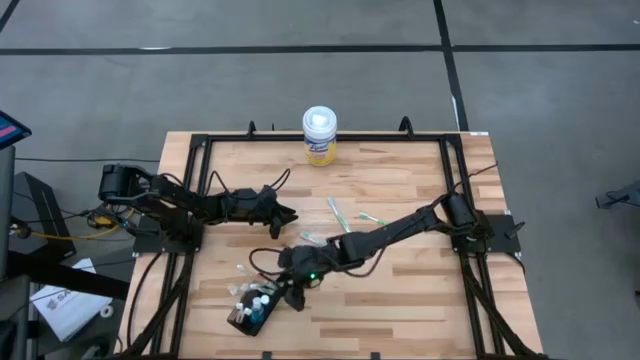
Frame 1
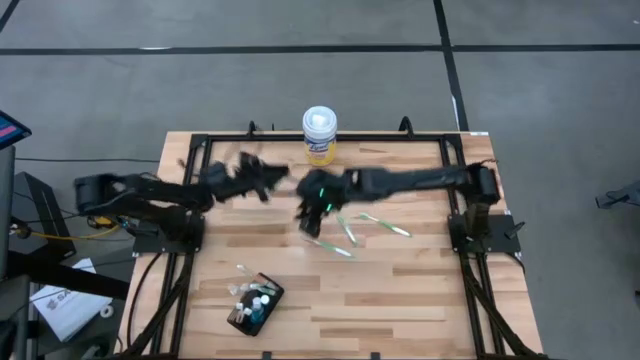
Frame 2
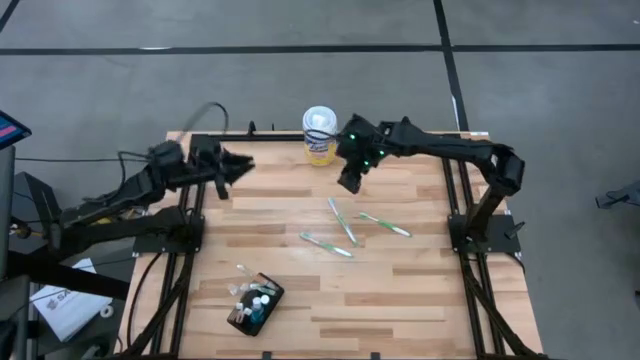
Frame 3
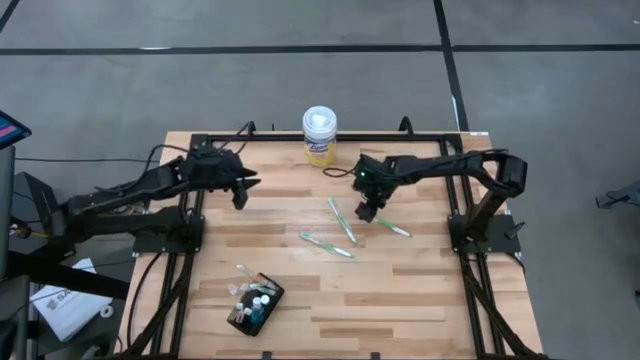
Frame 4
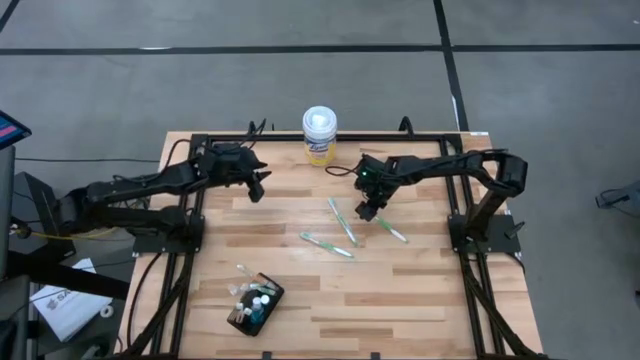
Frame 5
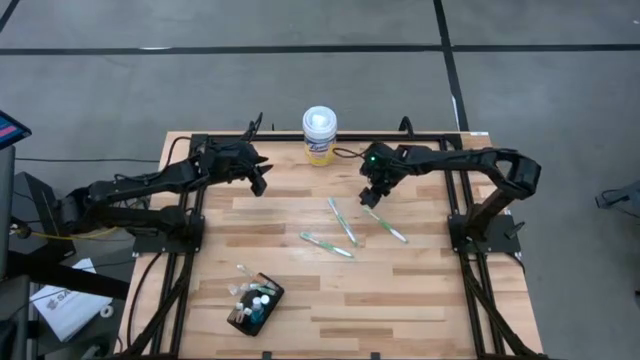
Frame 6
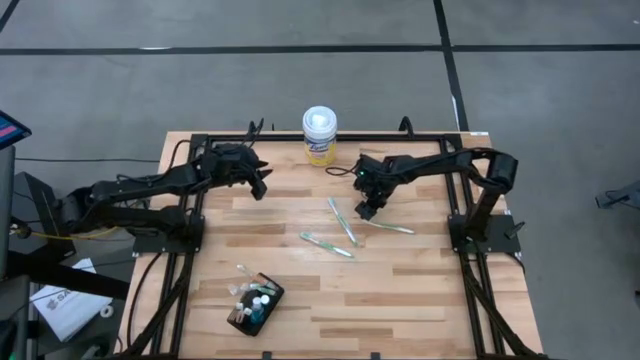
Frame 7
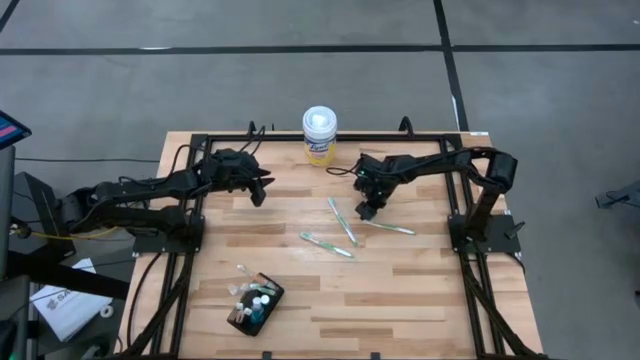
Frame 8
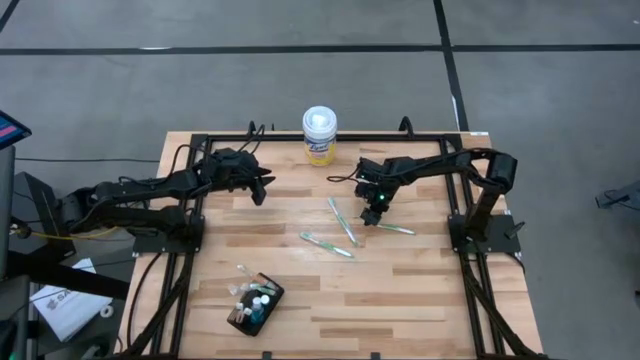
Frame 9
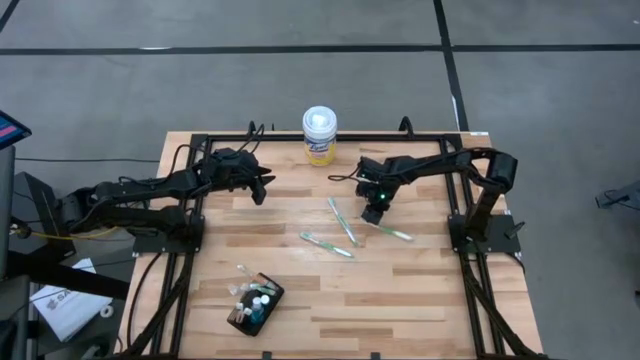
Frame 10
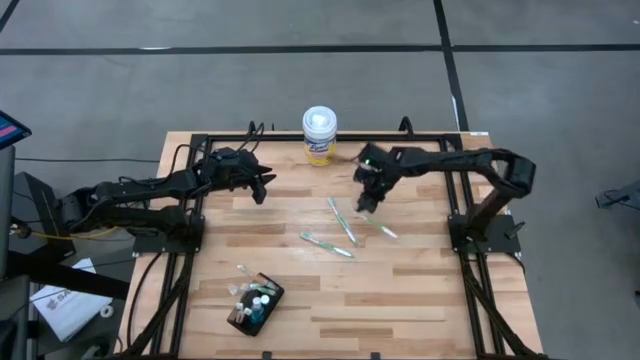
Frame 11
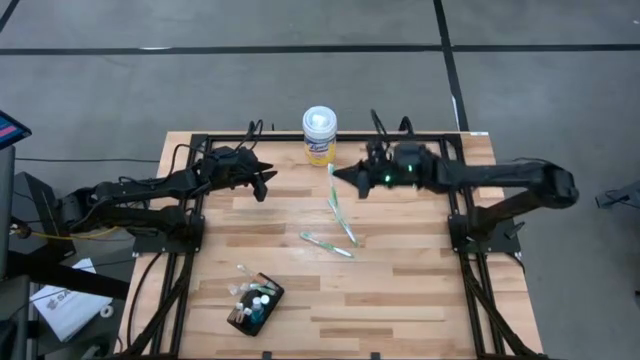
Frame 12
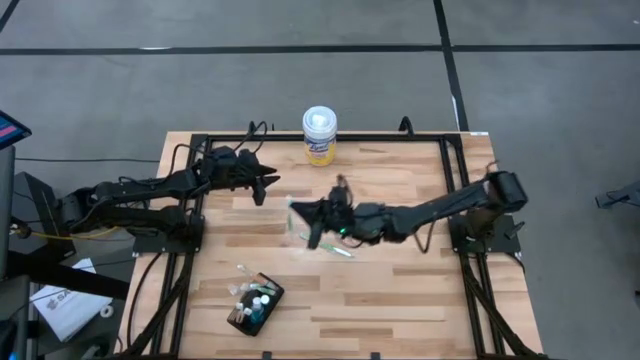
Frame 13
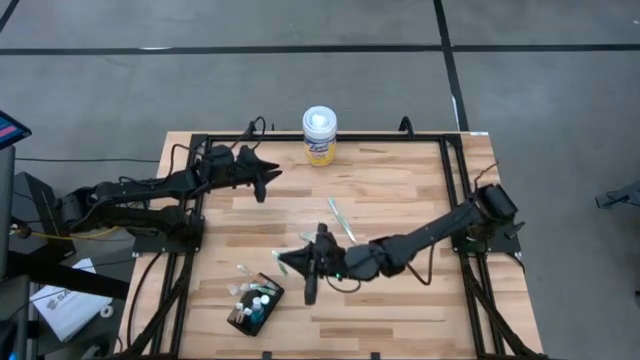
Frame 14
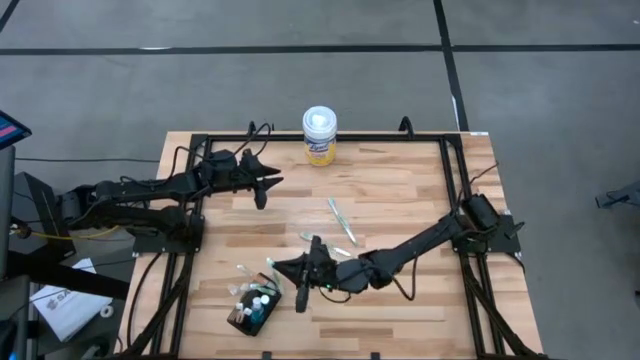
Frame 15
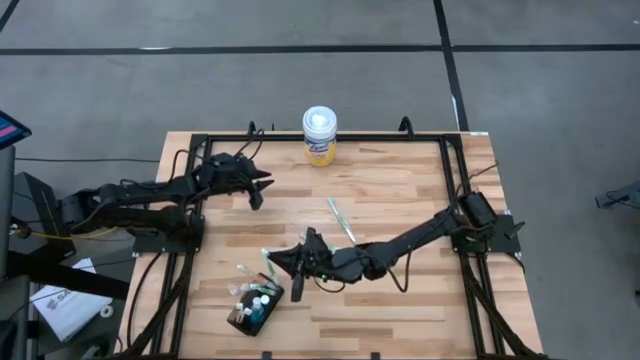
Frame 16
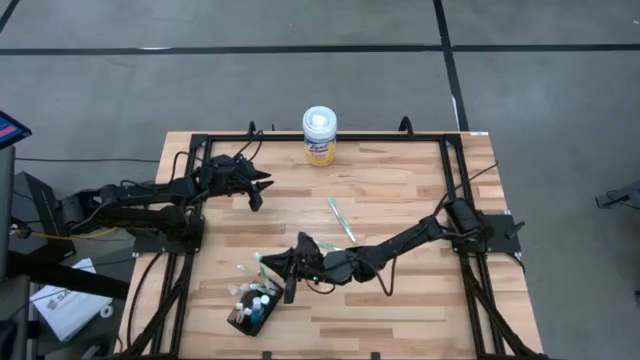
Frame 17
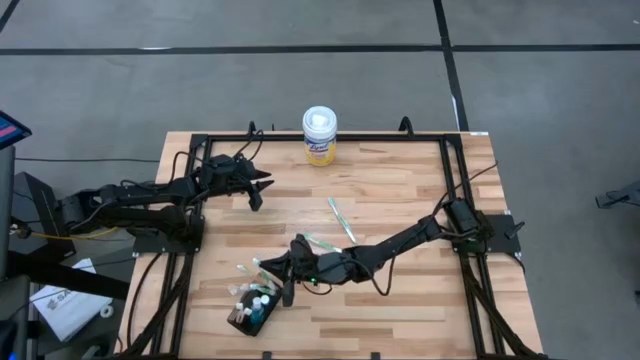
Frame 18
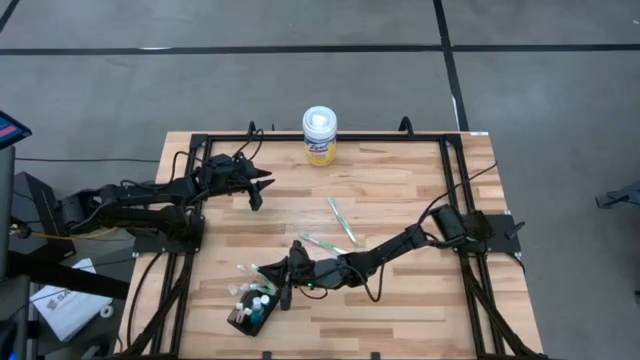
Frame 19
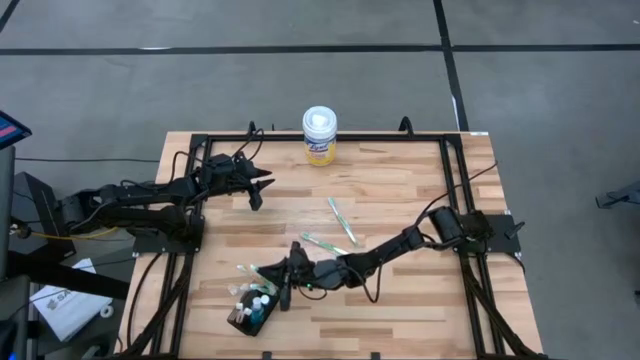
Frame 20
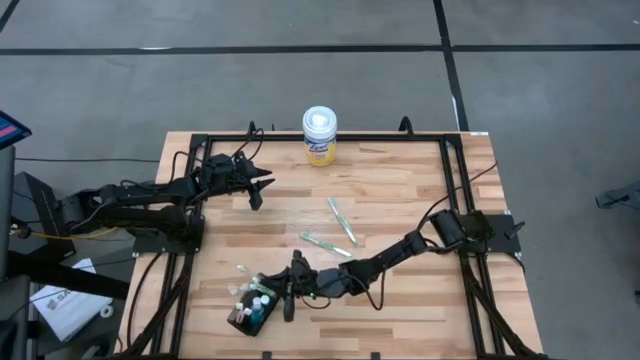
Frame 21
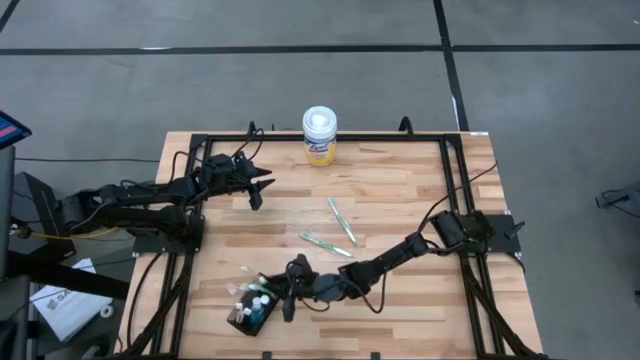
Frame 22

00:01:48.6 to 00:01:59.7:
Task: Pick & Place toothbrushing station
Put the green toothbrush into the black wire organizer bin

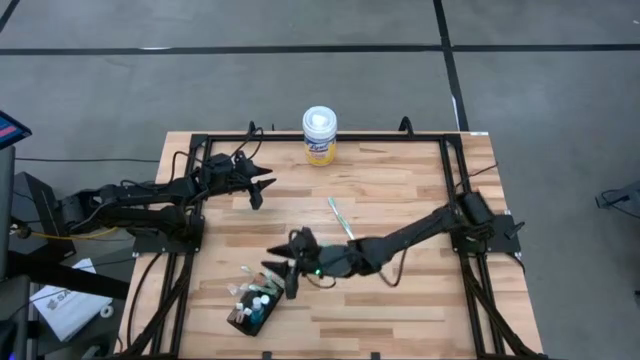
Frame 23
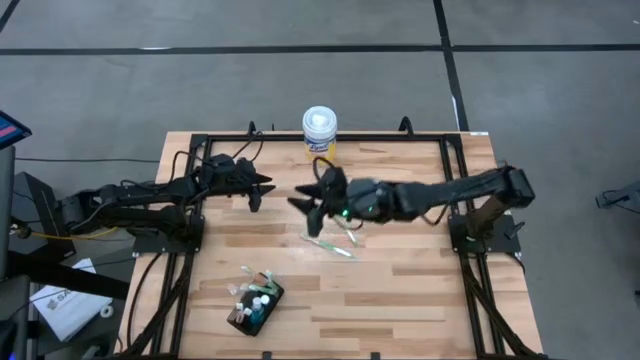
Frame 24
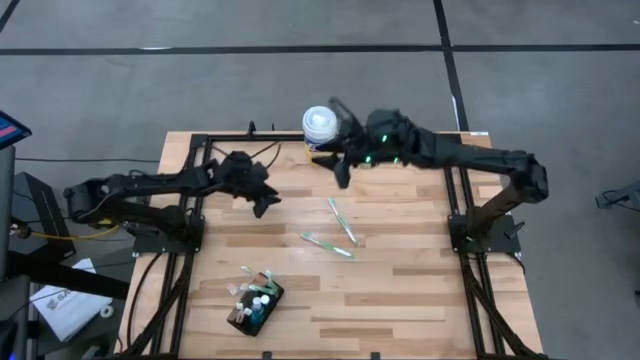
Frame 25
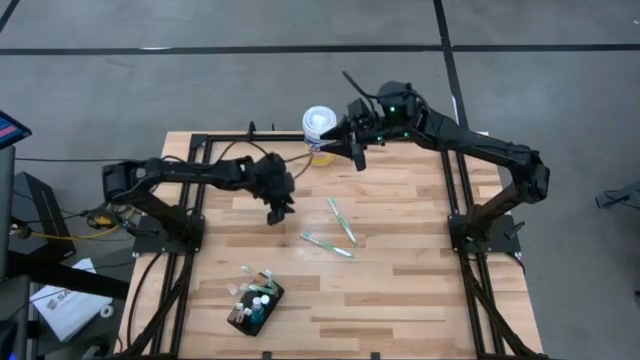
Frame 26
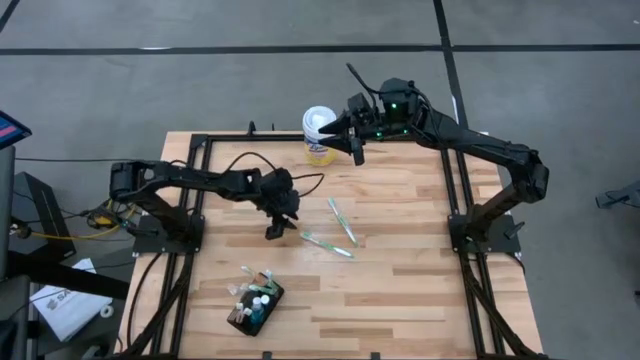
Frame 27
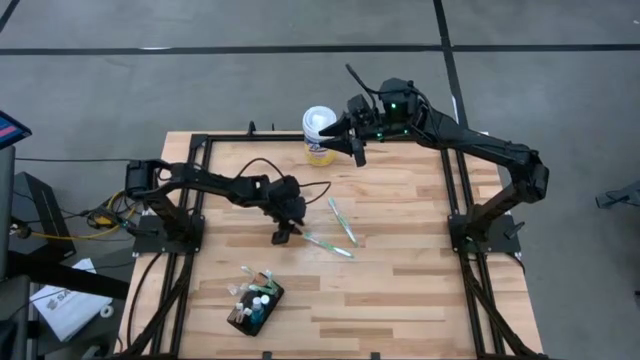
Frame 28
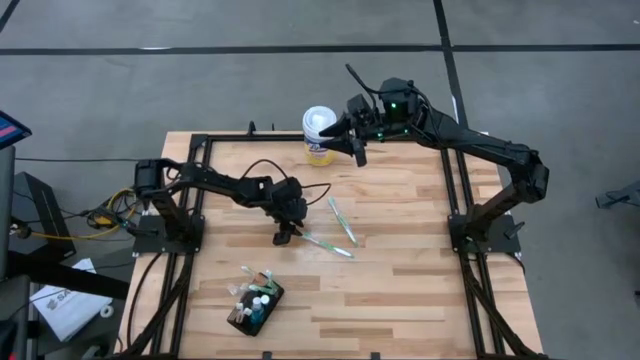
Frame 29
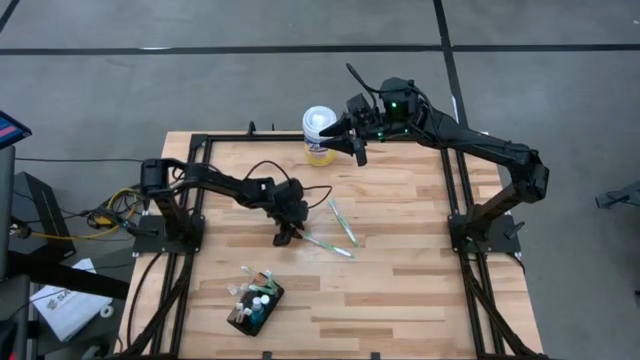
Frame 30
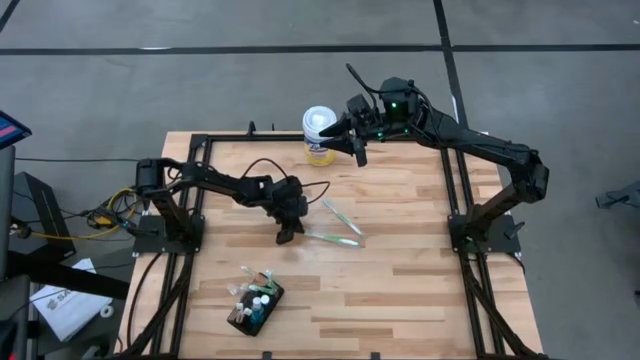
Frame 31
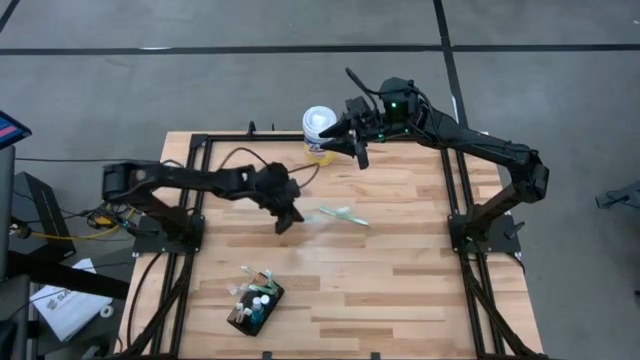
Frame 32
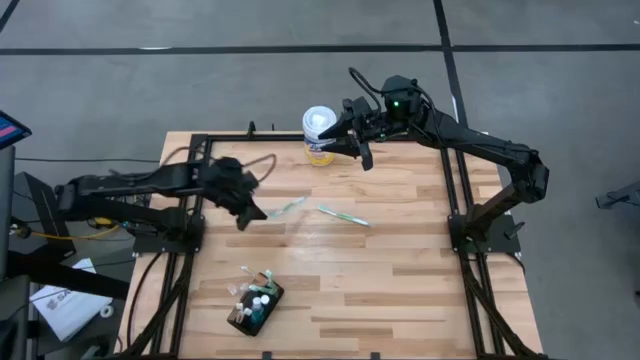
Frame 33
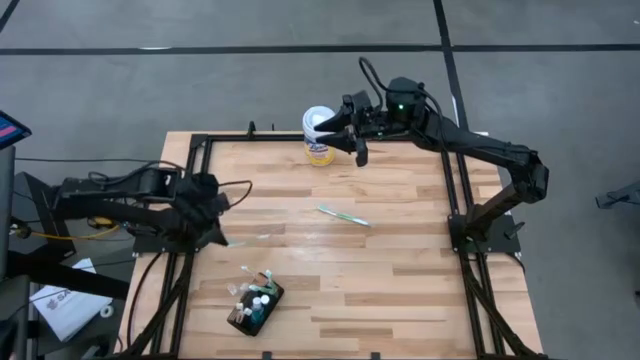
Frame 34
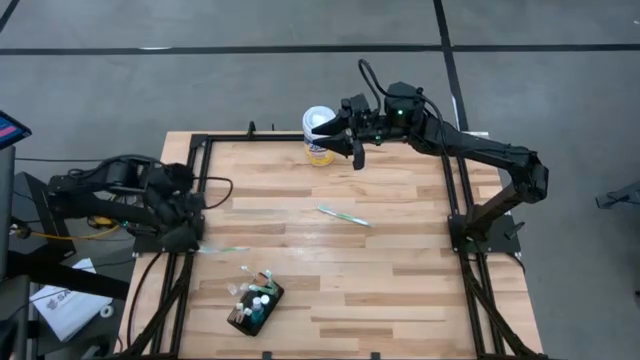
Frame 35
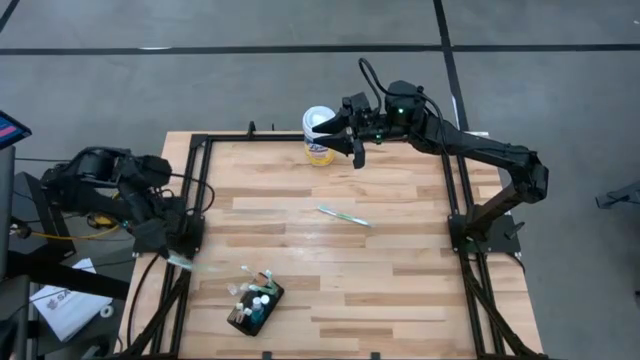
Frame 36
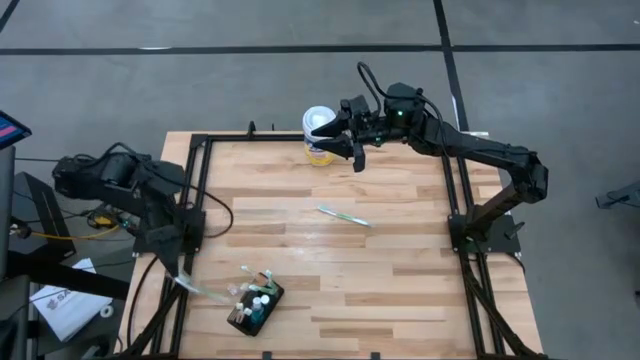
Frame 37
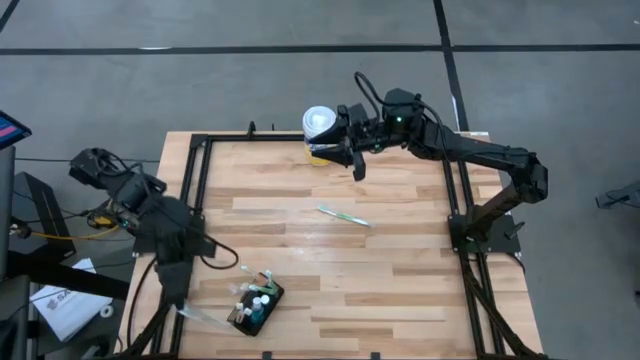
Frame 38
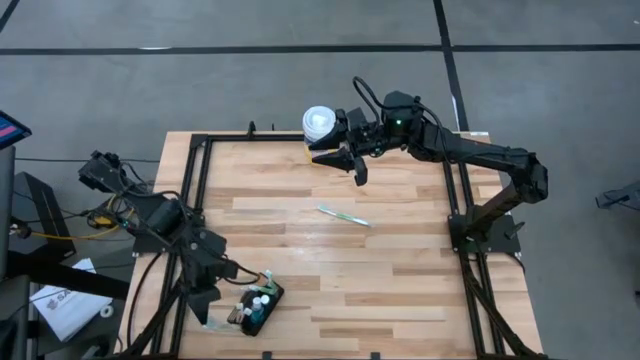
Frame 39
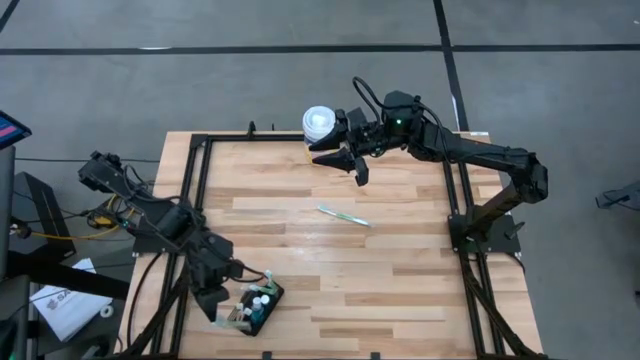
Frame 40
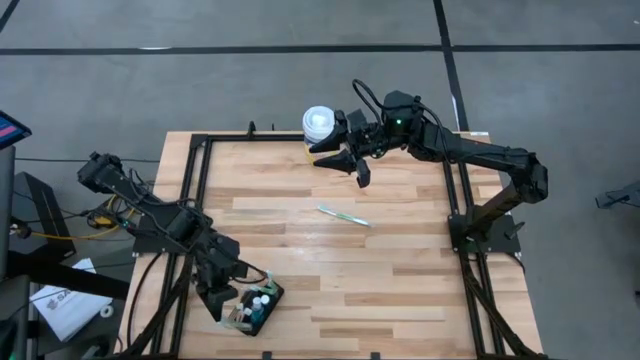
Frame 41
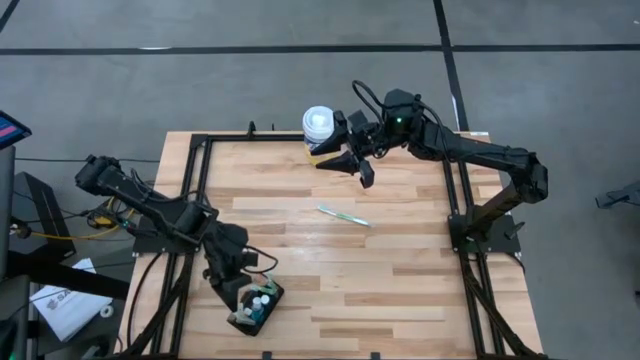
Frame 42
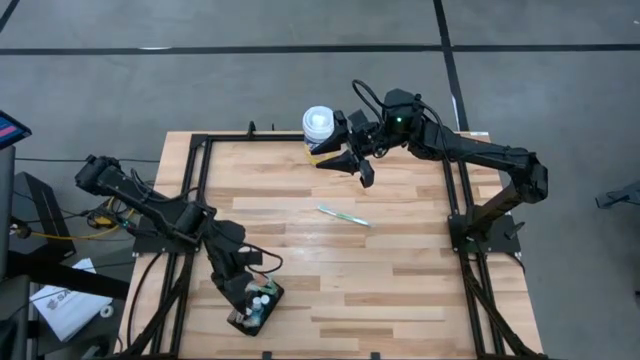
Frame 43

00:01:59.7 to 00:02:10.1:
Put the green toothbrush into the black wire organizer bin
